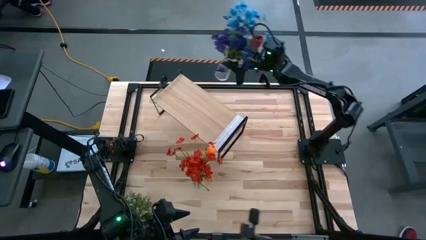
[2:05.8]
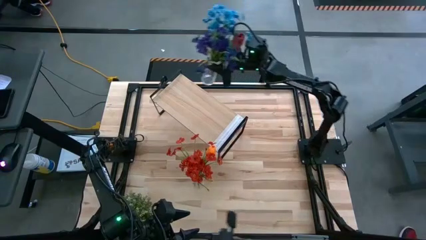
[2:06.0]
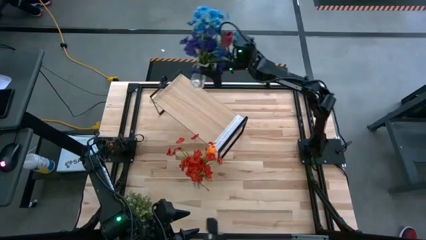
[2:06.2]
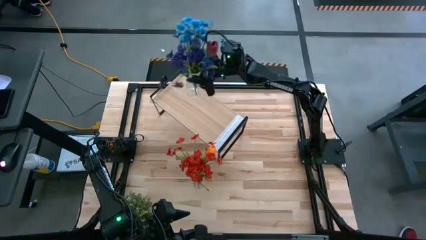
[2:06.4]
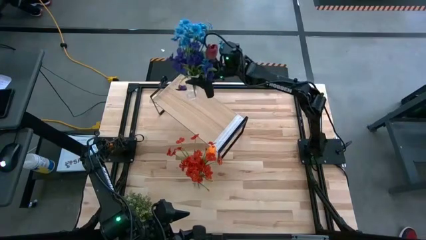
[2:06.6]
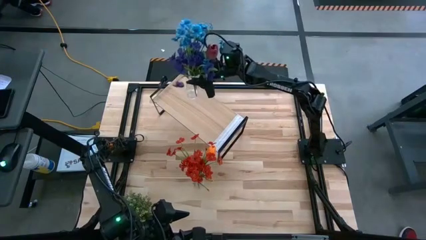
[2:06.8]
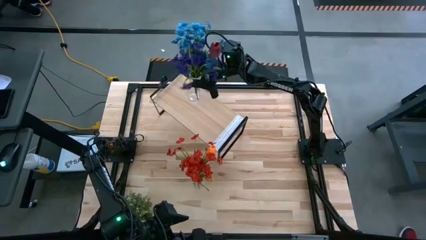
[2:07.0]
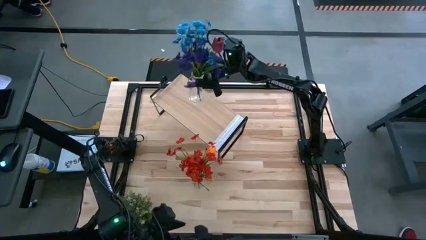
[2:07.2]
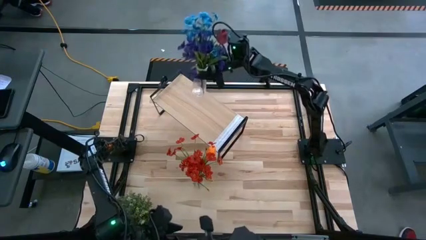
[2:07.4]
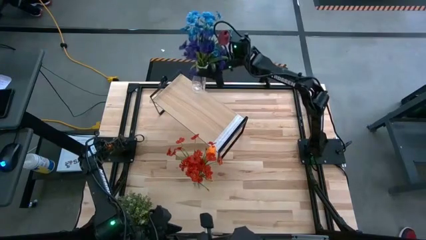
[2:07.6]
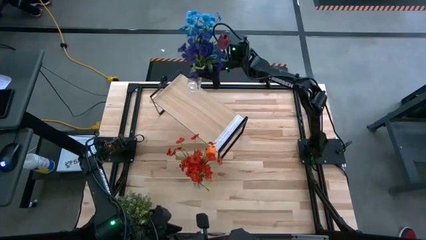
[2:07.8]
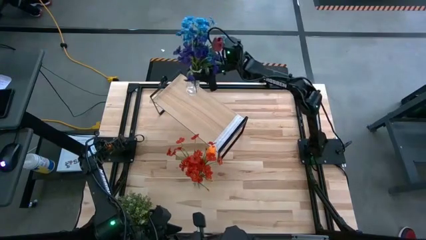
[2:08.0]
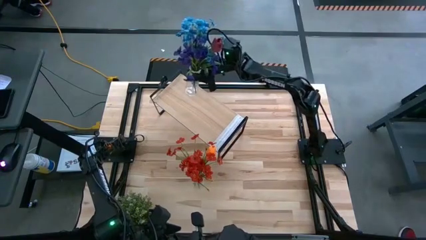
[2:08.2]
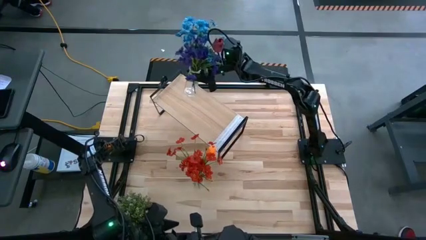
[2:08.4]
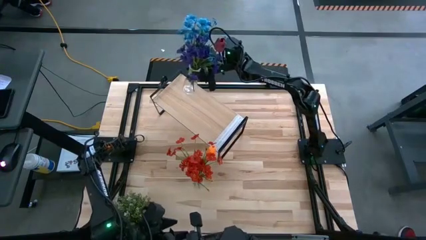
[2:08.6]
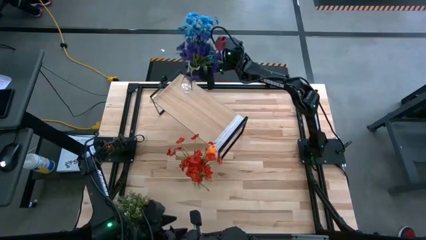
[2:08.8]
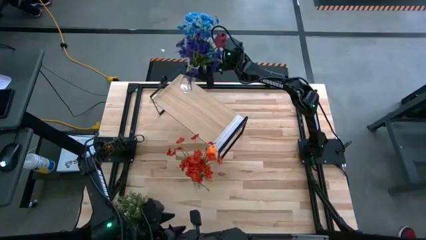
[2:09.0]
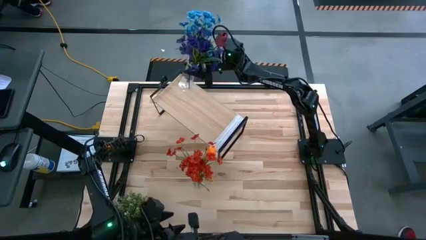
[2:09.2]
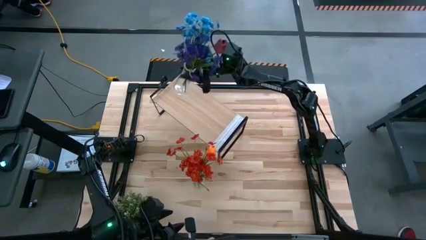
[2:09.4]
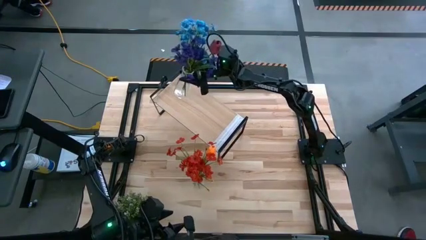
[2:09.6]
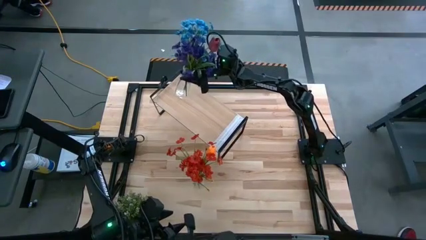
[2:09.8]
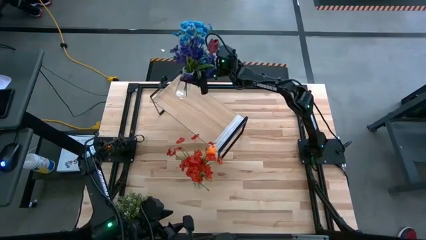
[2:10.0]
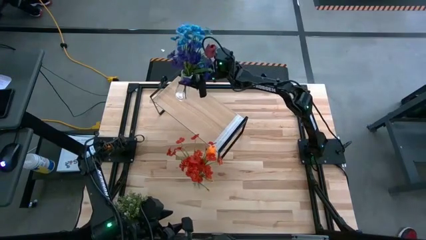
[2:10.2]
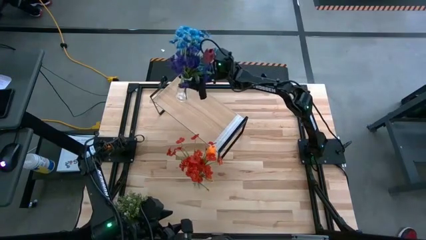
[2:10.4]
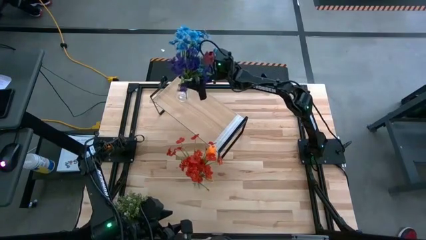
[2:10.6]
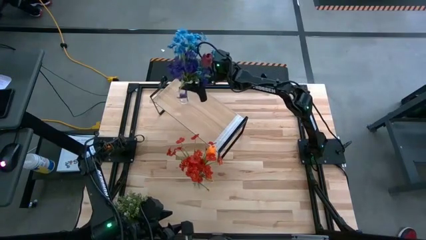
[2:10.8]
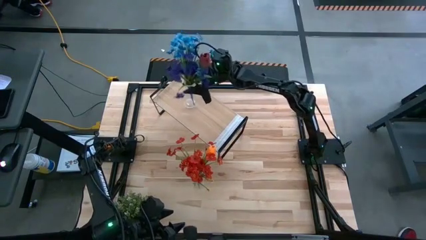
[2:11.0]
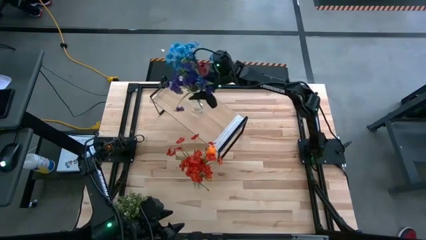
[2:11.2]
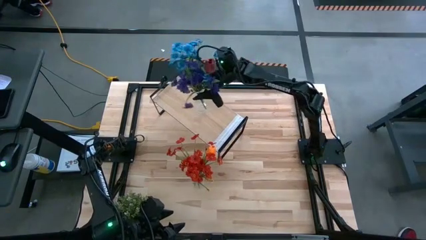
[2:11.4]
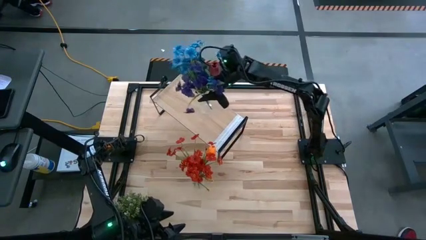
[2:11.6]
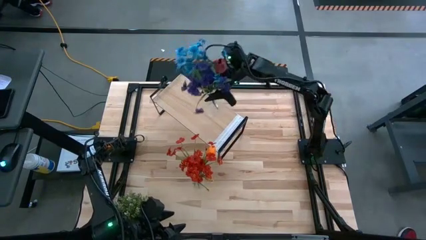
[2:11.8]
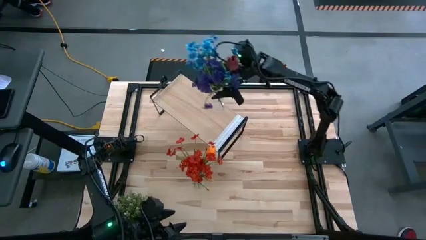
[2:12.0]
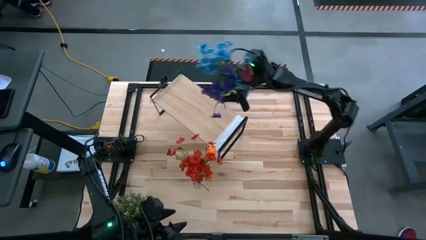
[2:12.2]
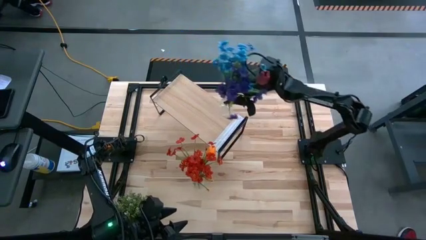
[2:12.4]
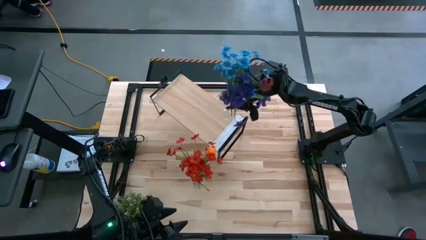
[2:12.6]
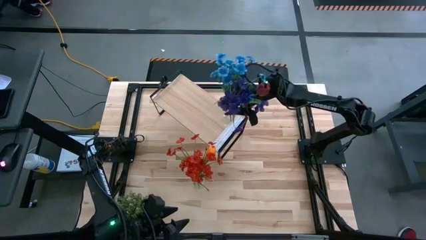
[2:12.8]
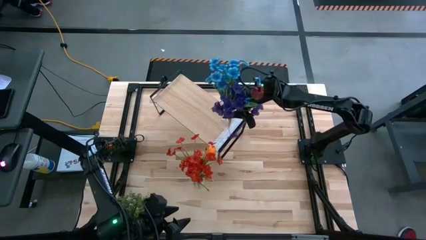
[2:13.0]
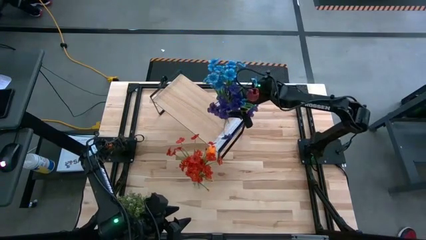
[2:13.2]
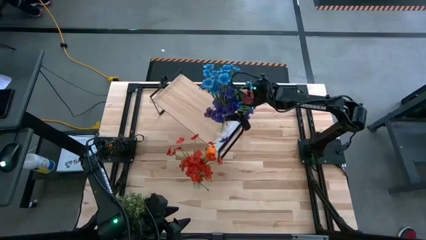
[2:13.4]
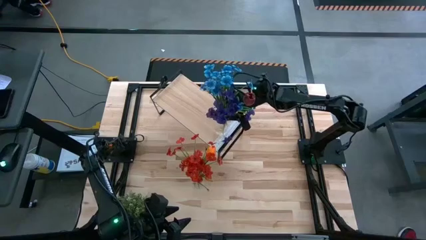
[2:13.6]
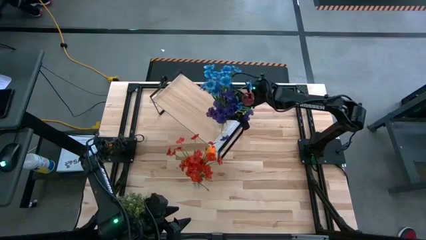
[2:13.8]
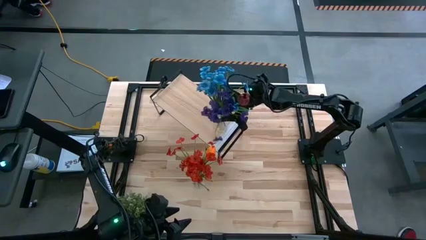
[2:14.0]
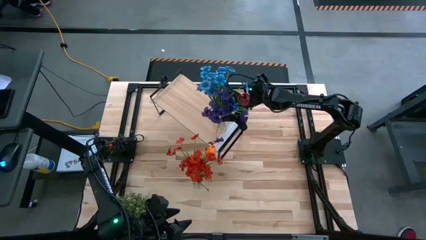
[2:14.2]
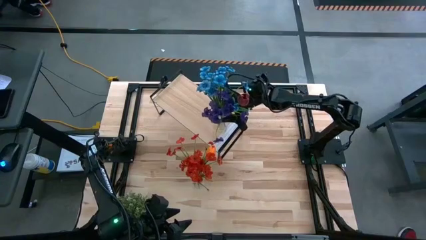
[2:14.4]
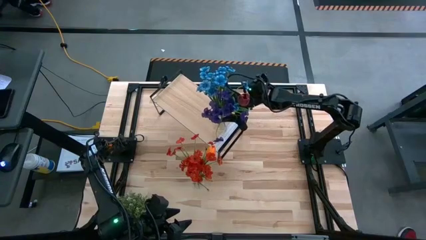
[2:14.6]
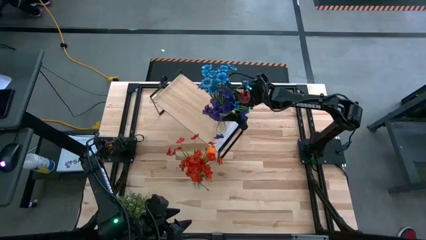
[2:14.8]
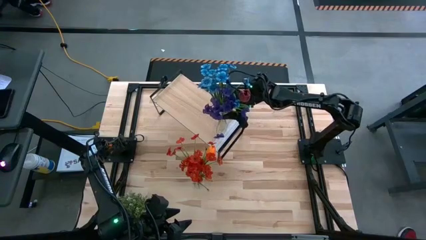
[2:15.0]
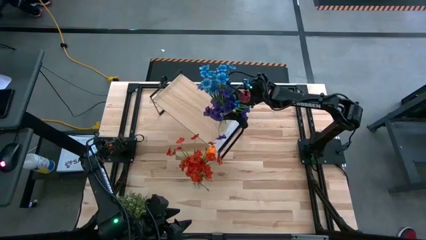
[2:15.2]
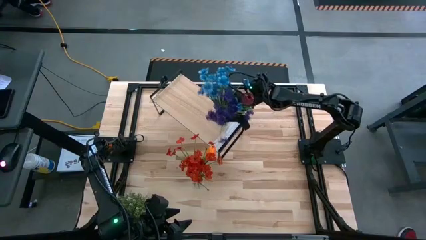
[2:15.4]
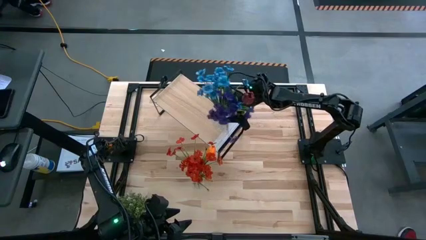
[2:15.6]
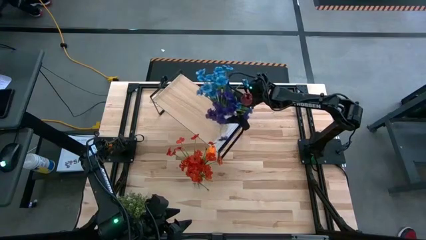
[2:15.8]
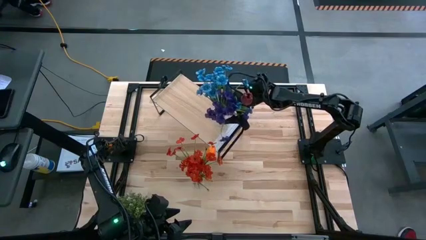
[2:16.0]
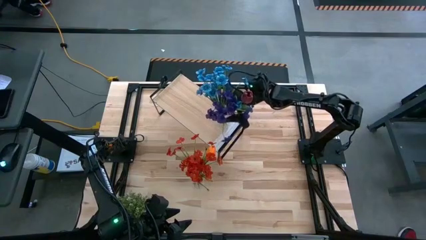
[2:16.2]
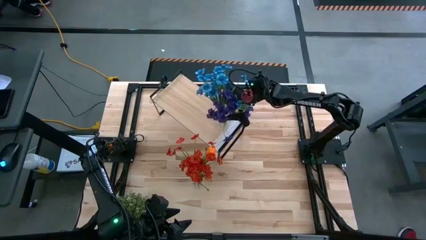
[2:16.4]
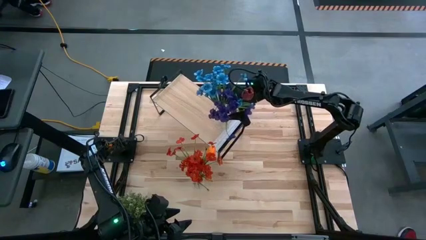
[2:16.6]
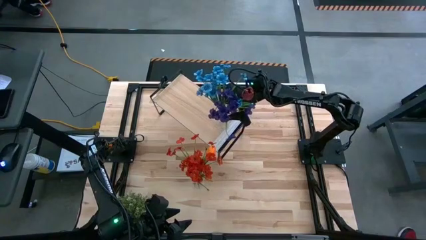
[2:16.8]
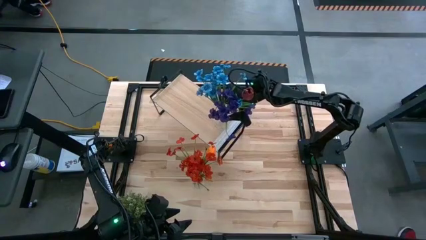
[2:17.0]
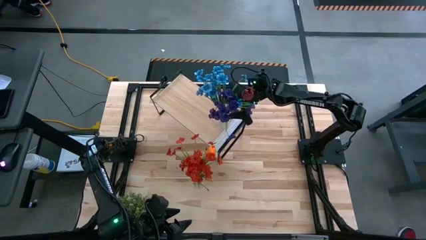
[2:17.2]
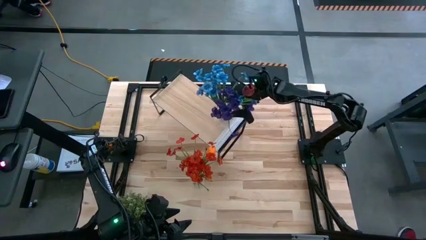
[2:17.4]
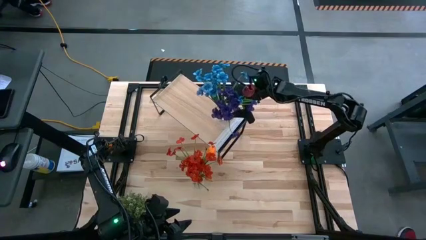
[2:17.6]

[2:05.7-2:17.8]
Task: Pick and place flowers into a vace then onto a shelf
Put the top transparent flower vase on the shelf
